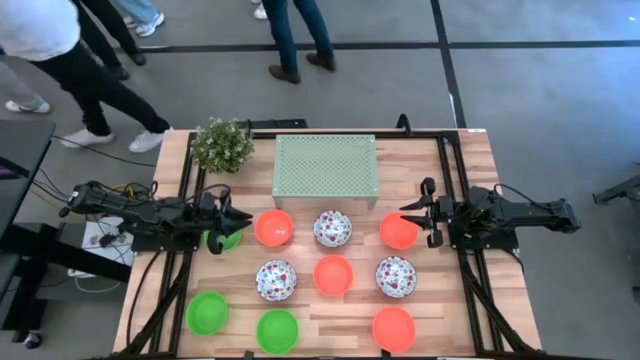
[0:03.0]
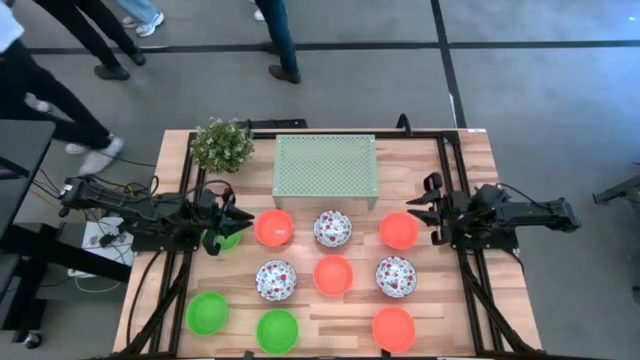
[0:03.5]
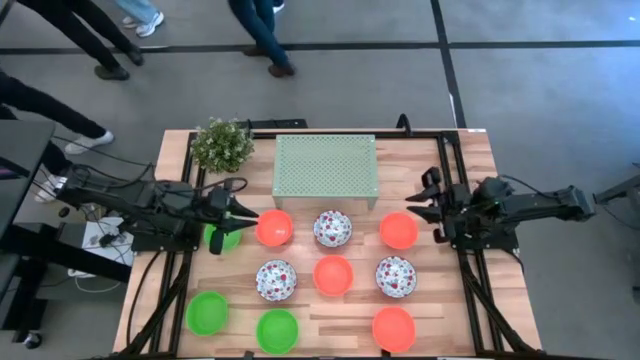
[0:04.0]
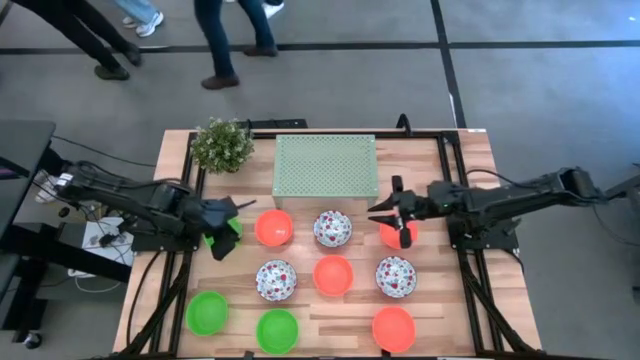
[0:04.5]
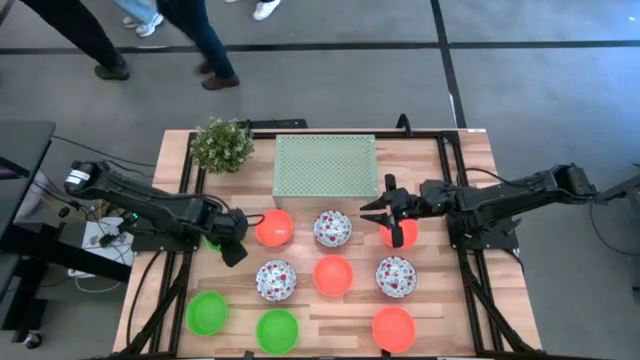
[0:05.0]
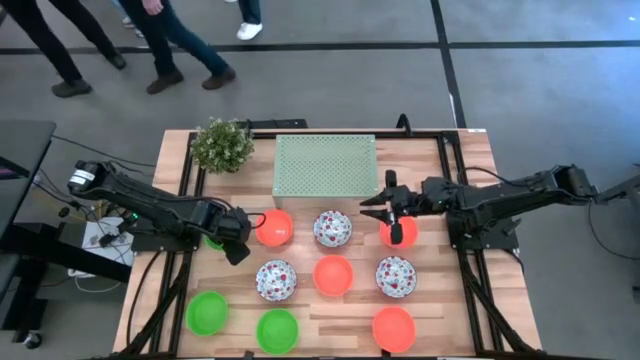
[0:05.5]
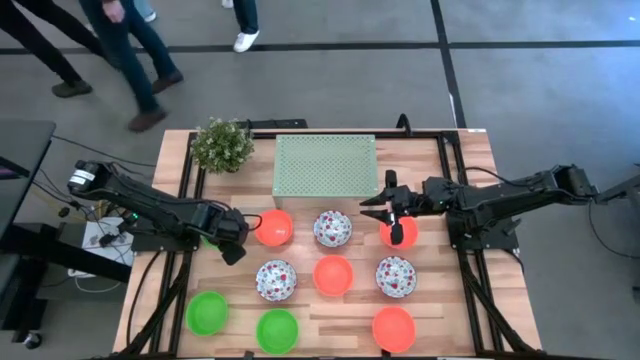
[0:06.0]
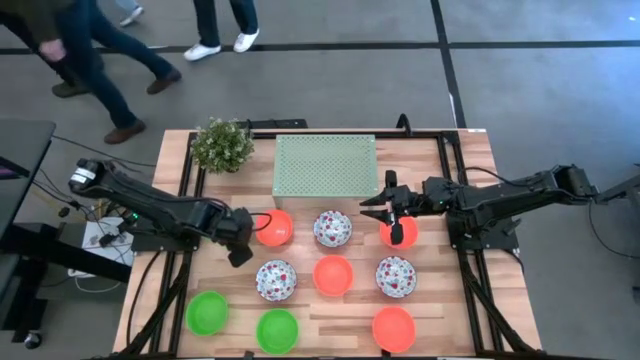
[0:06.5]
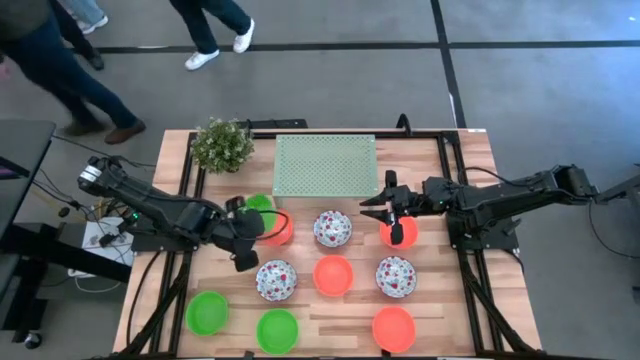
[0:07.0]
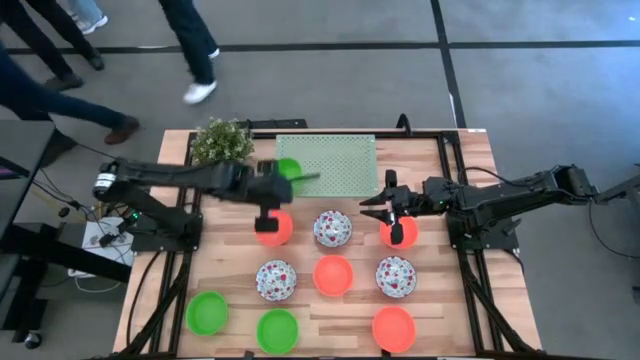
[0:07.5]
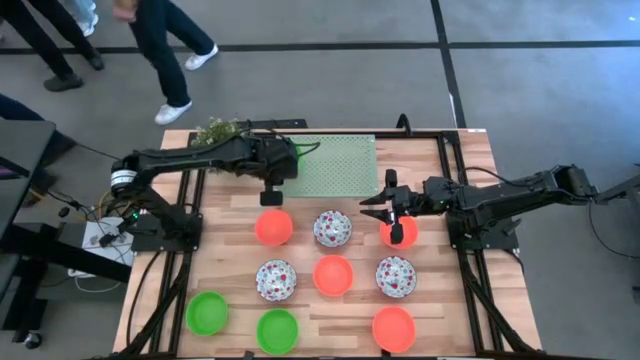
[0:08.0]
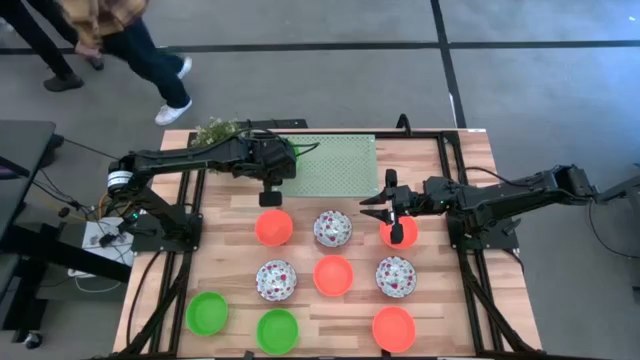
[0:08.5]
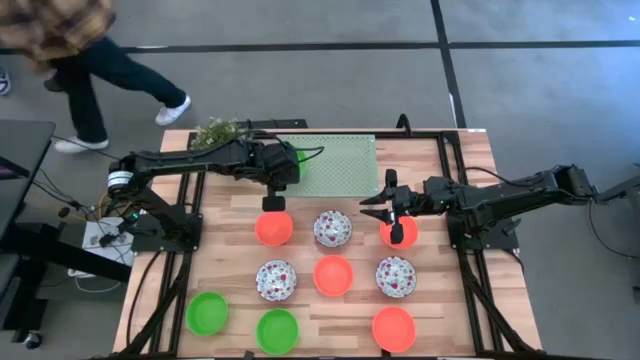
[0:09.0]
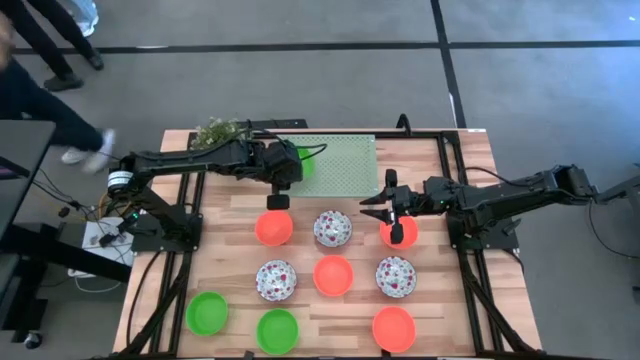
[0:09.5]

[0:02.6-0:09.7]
Task: Pick & Place Mini bowls
Put the green bowl on the shelf

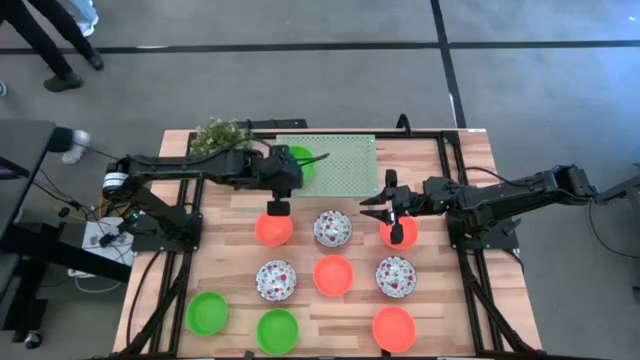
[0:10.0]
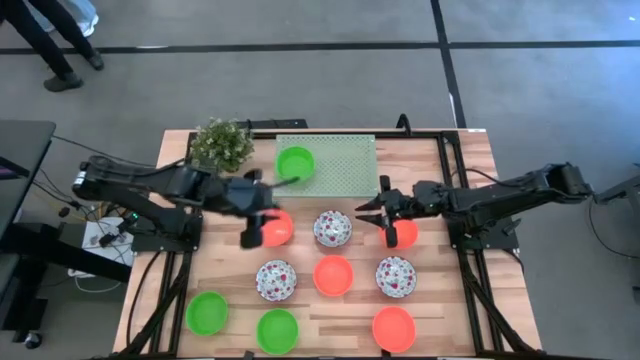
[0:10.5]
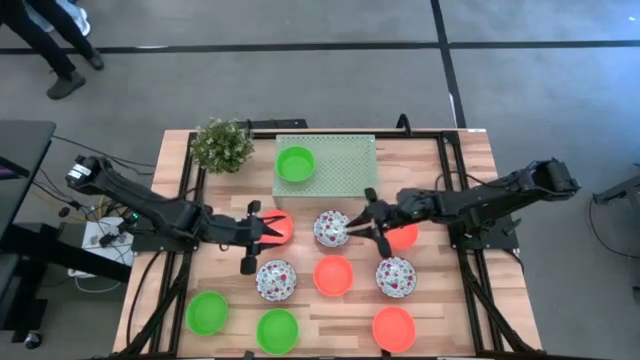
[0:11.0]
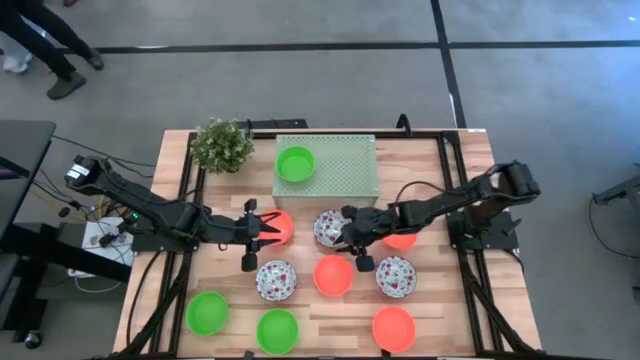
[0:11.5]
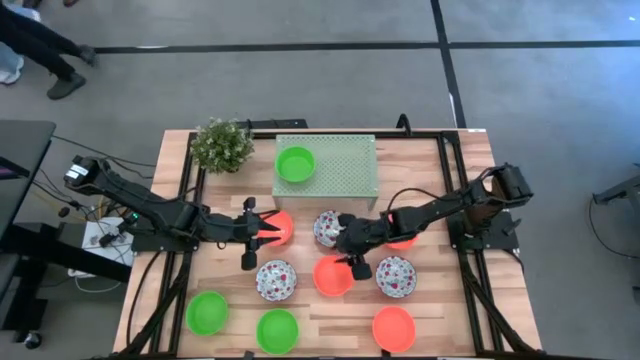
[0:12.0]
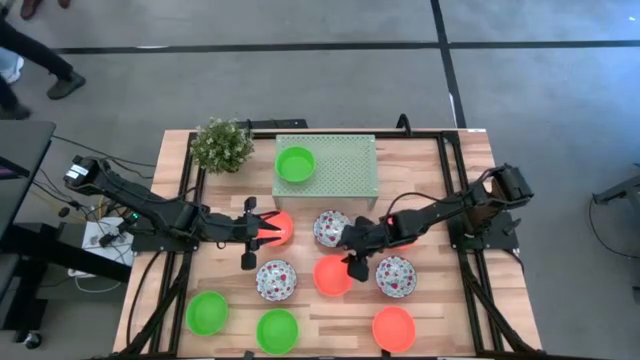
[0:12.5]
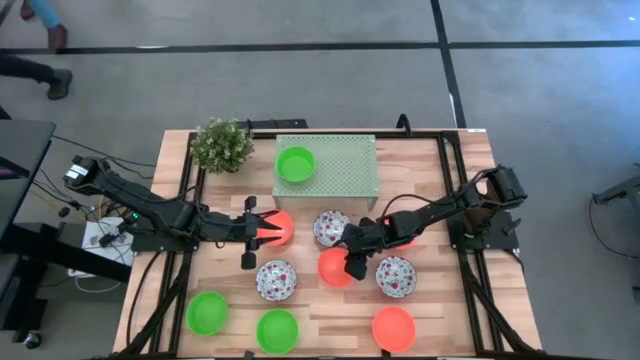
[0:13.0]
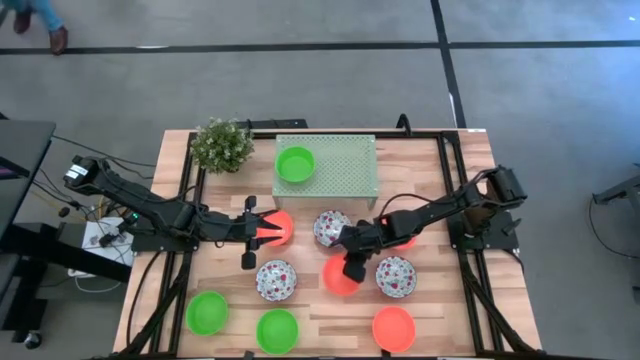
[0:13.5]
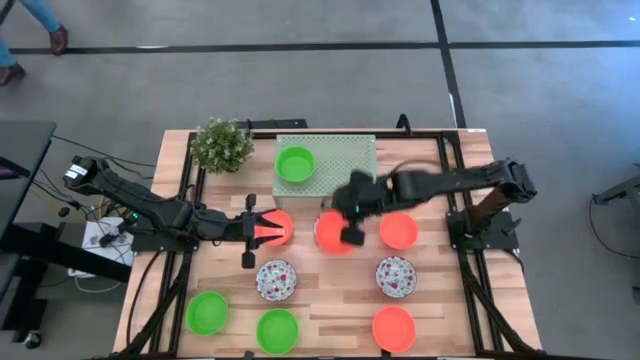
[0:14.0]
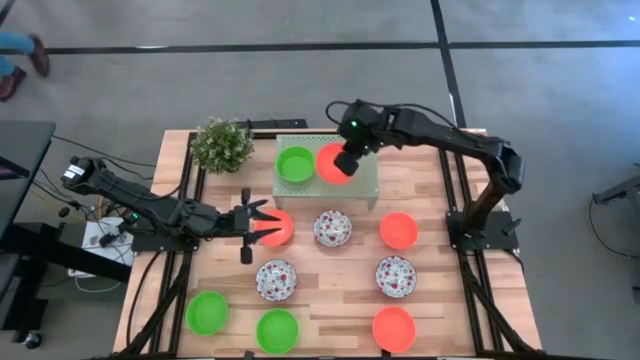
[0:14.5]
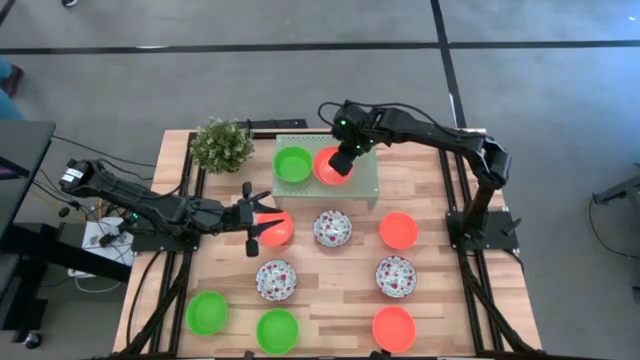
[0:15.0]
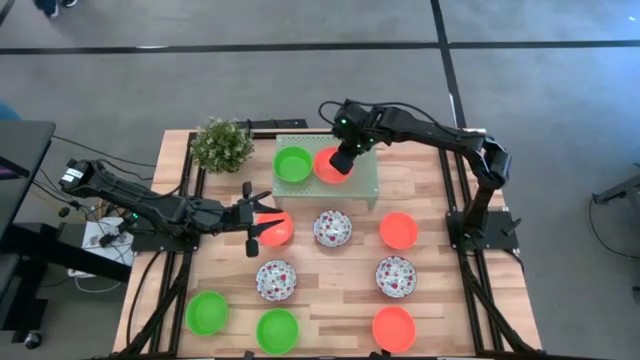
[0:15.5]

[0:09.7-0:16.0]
Put the orange bowl on the shelf

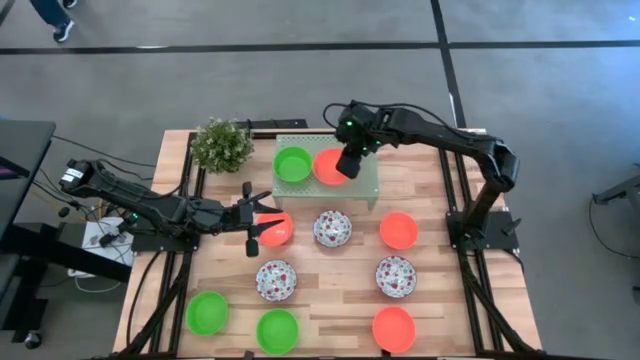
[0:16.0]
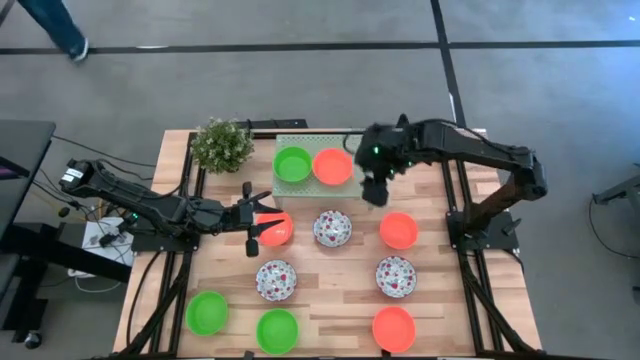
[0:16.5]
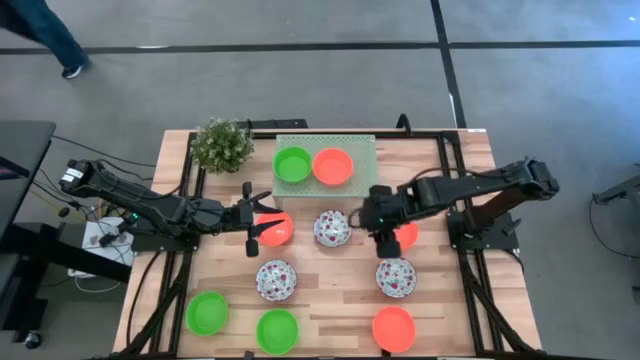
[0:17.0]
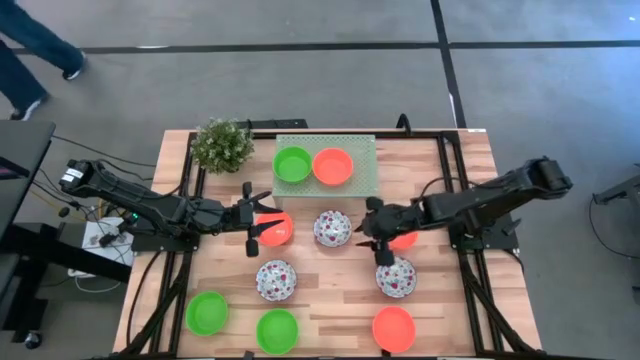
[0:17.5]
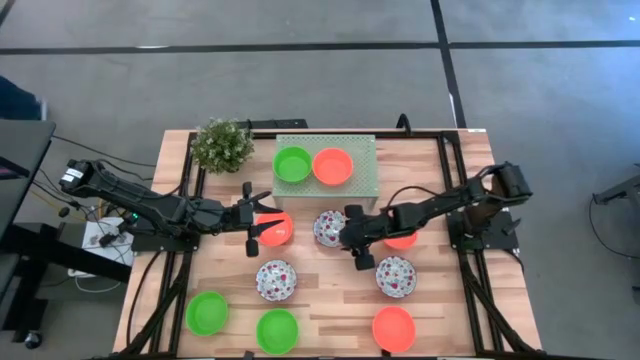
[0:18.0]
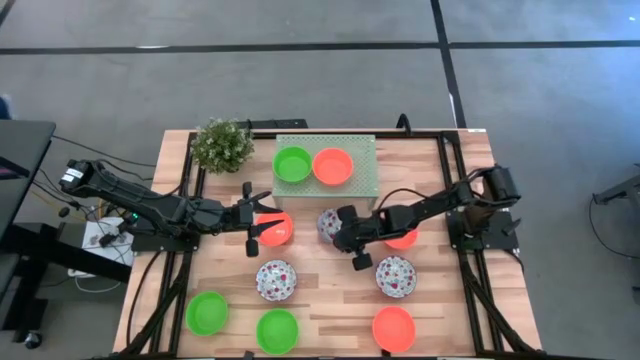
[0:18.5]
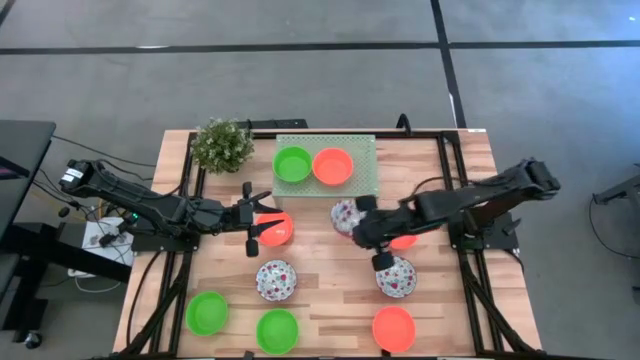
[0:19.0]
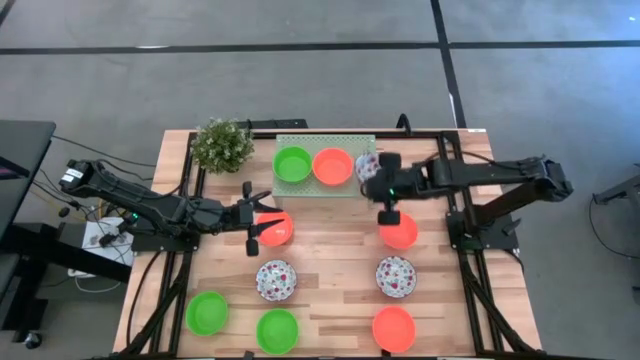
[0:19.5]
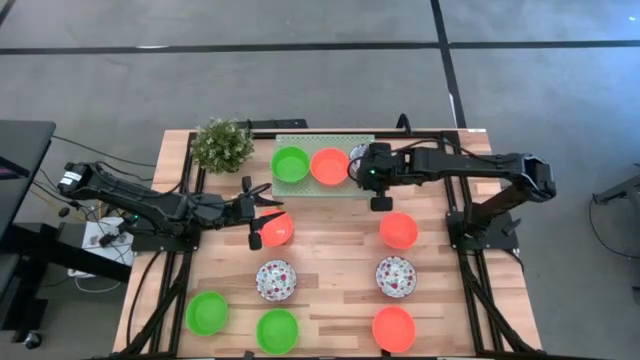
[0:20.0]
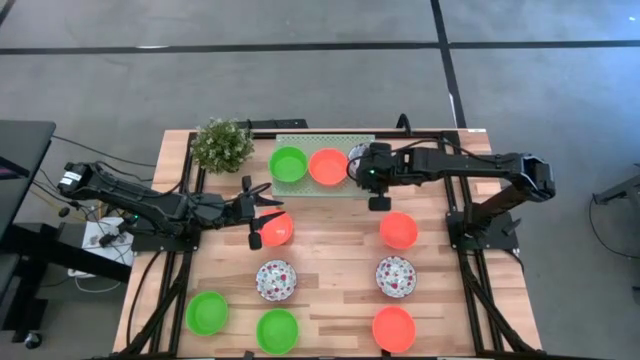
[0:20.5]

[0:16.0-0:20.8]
Put the white bowl on the shelf

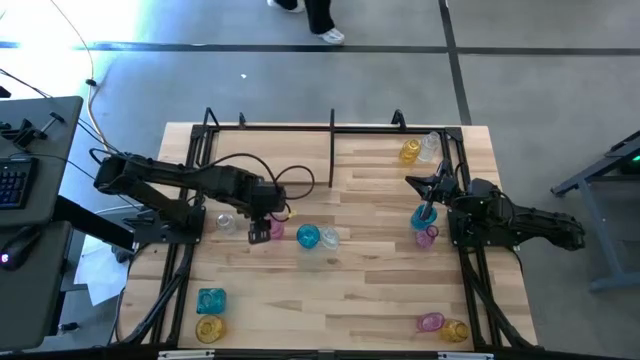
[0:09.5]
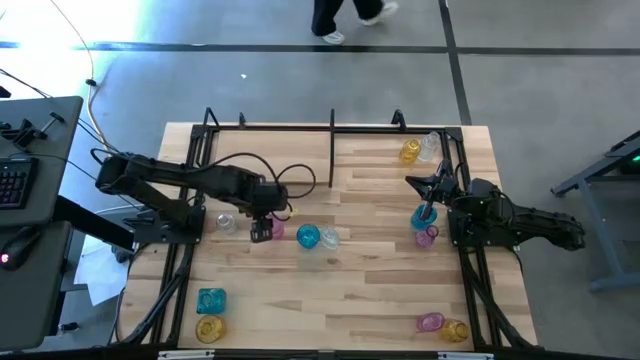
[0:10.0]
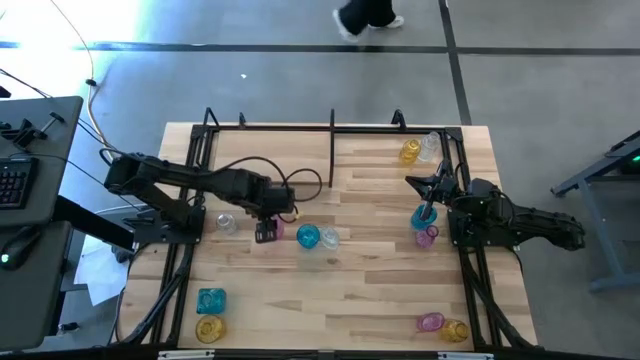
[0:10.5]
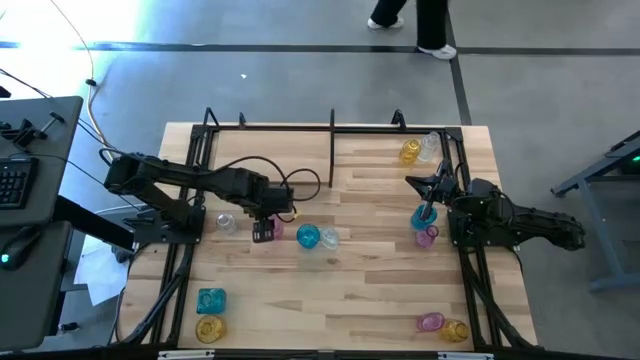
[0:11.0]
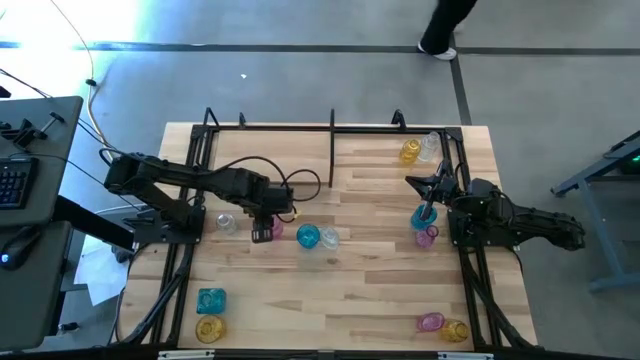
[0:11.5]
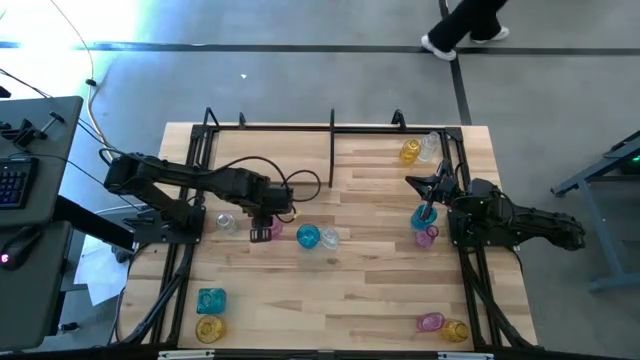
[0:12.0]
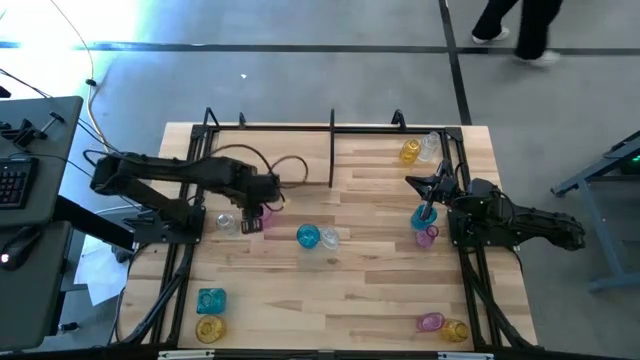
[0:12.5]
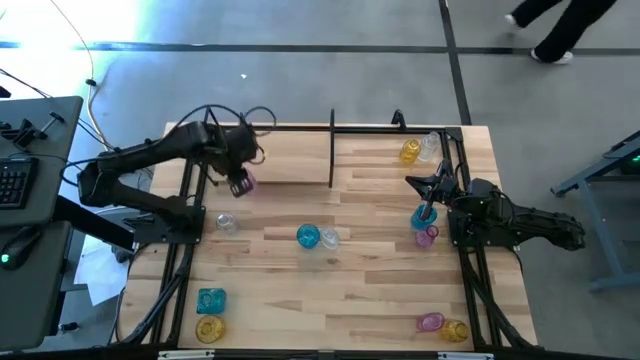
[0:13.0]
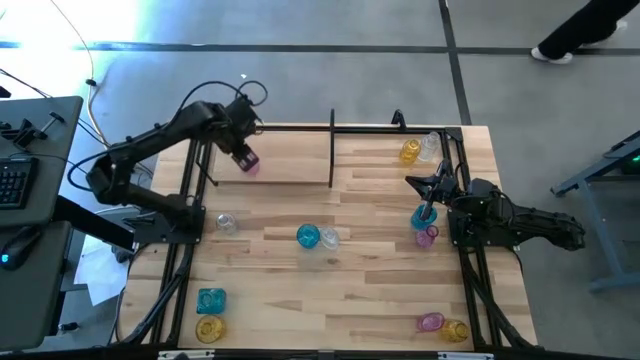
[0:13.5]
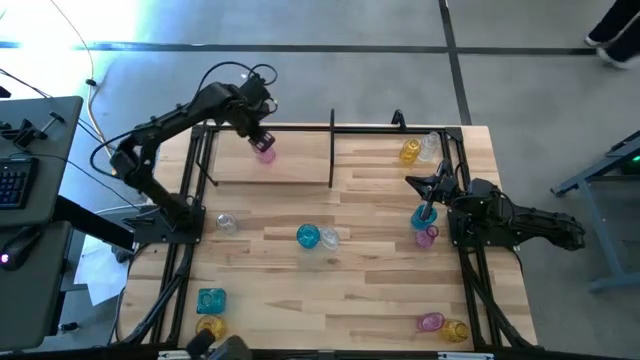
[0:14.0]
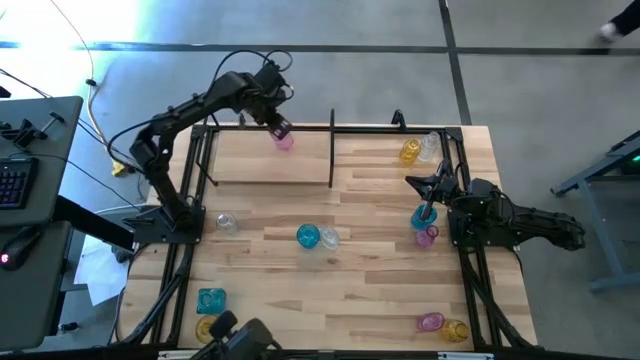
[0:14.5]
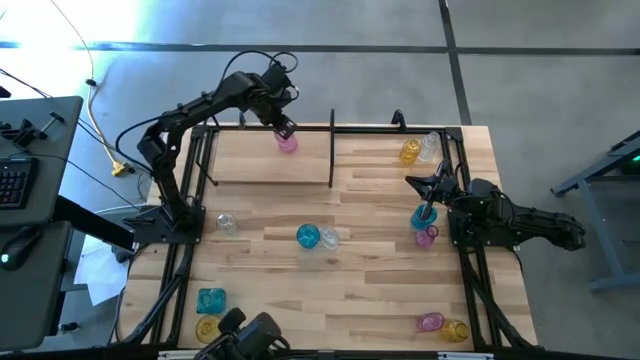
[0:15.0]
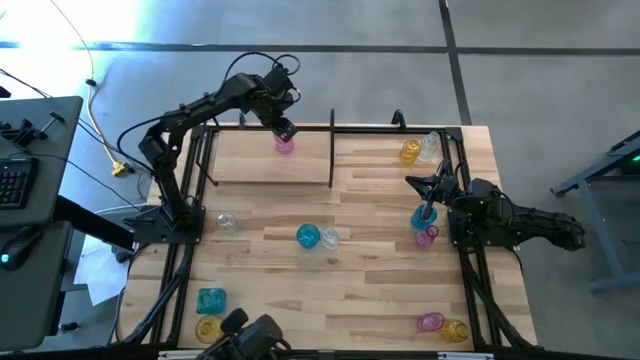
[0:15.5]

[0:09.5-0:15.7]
Task: sort vases onto shelf
Put the middle left purple flower vase on the shelf
